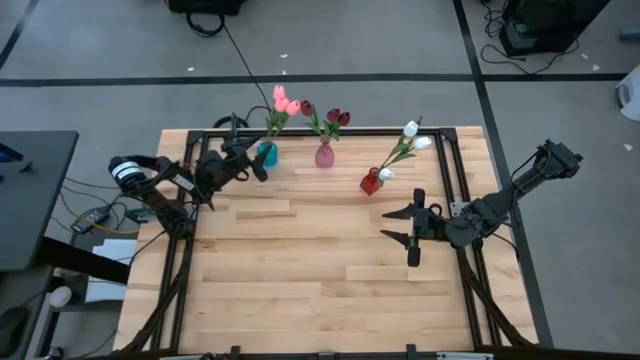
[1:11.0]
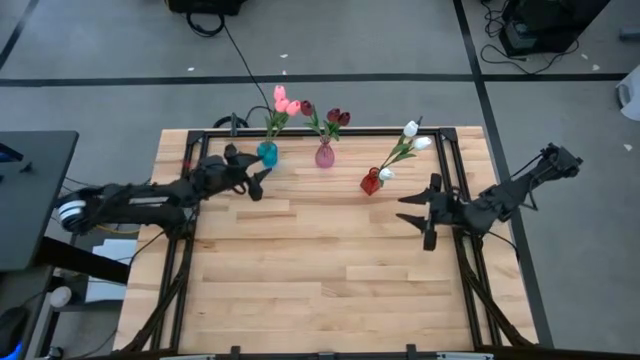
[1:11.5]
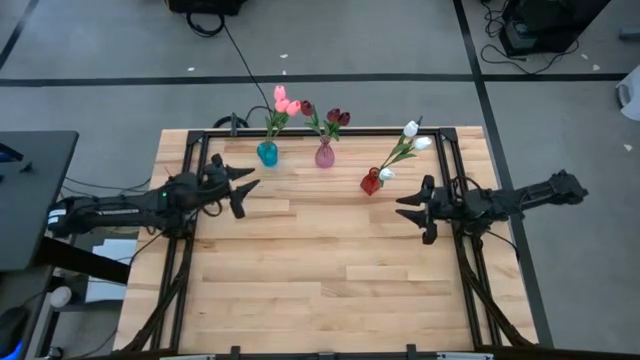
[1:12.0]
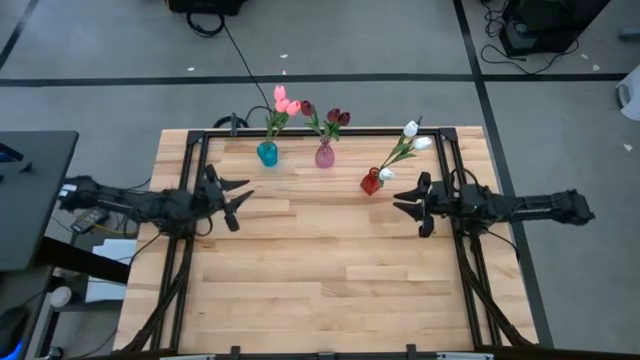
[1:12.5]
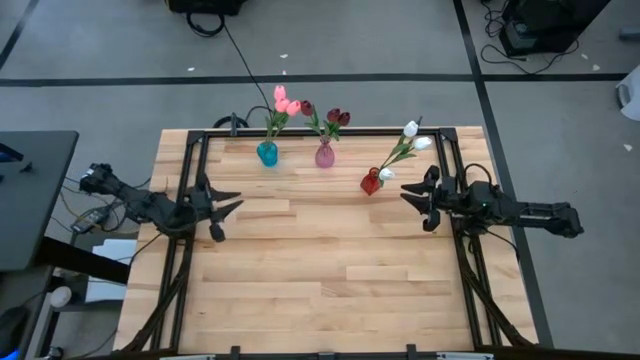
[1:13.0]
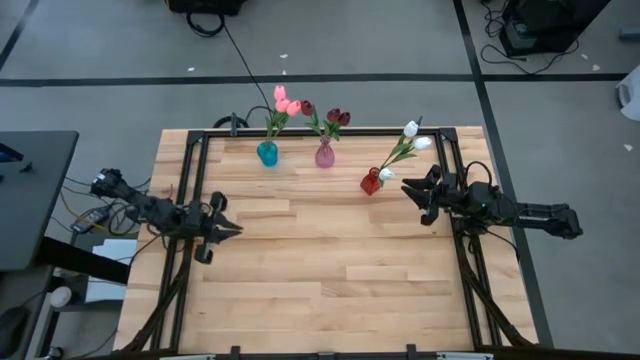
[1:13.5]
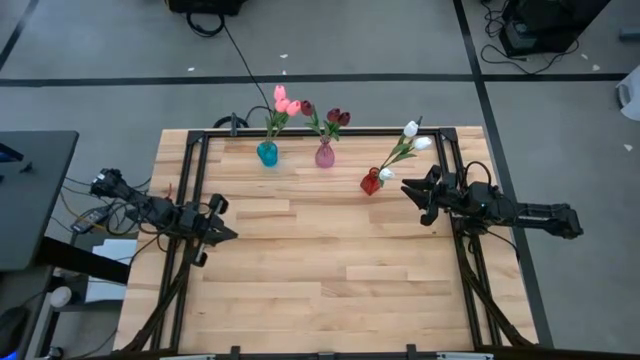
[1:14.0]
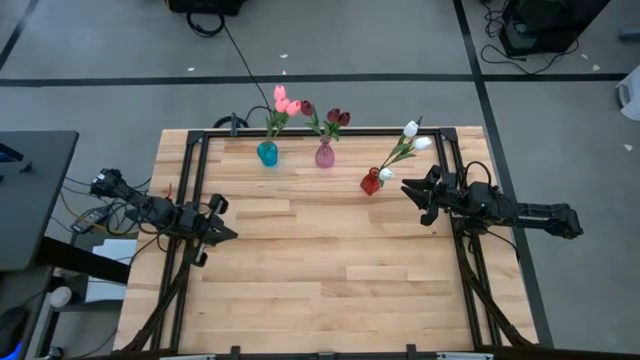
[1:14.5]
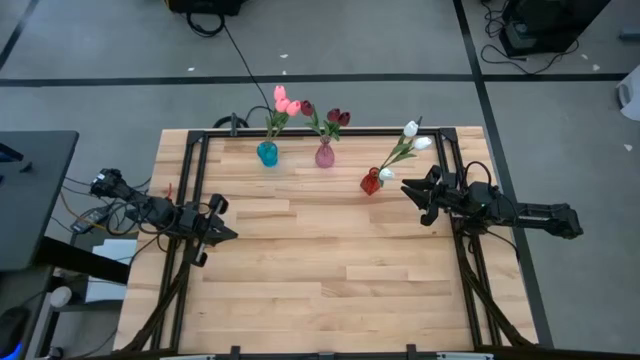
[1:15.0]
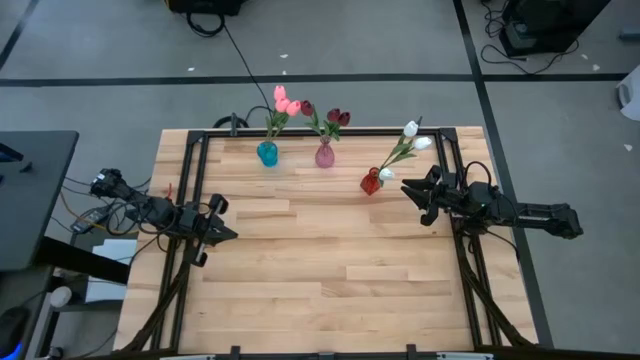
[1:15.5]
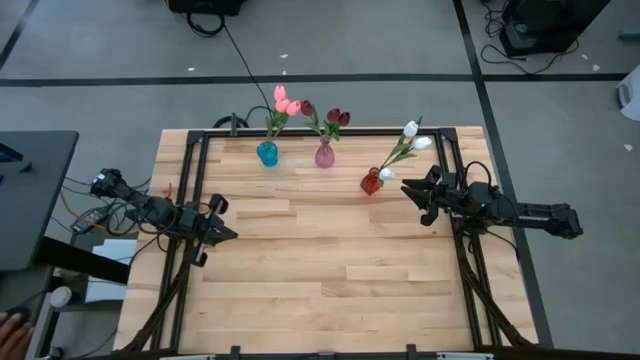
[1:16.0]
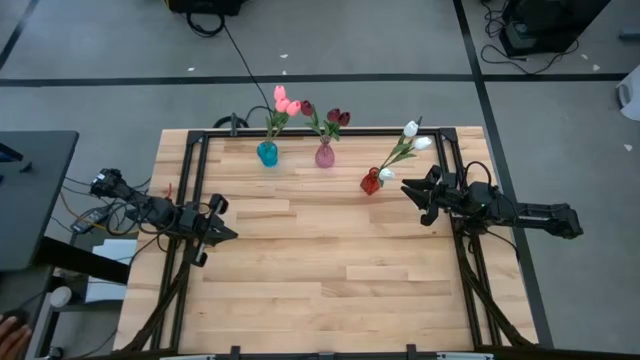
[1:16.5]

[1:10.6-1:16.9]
Task: Sort flowers into vase by color
Return to Home Position

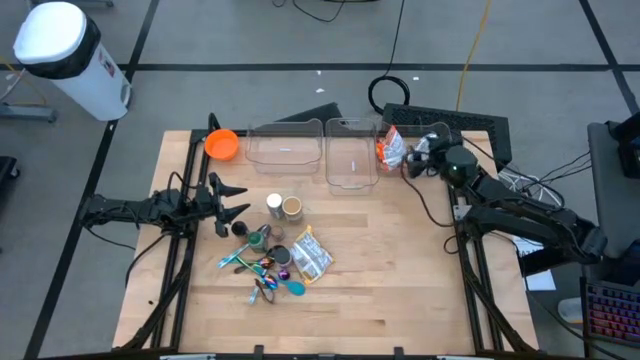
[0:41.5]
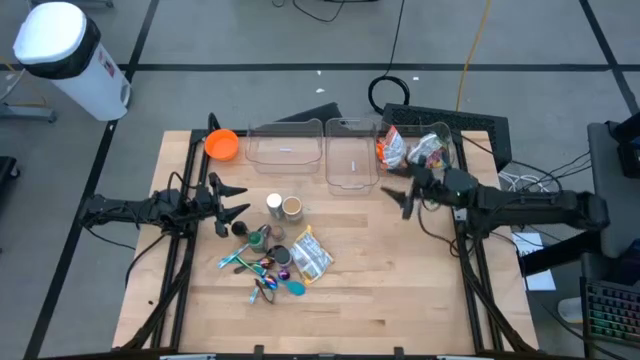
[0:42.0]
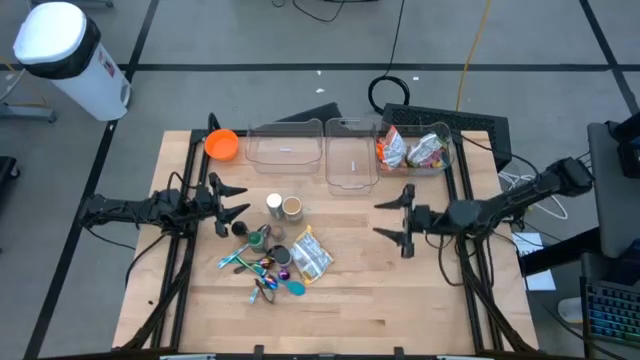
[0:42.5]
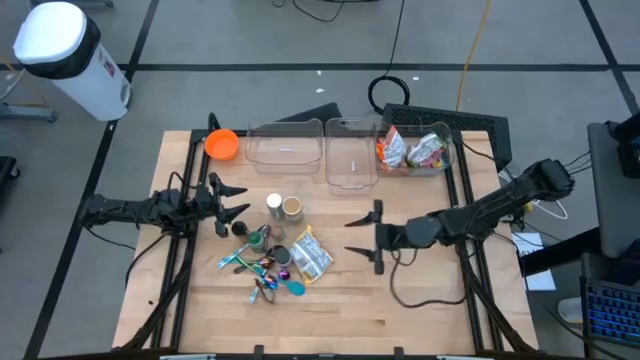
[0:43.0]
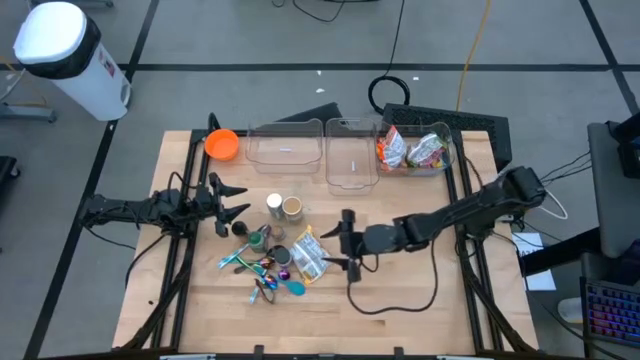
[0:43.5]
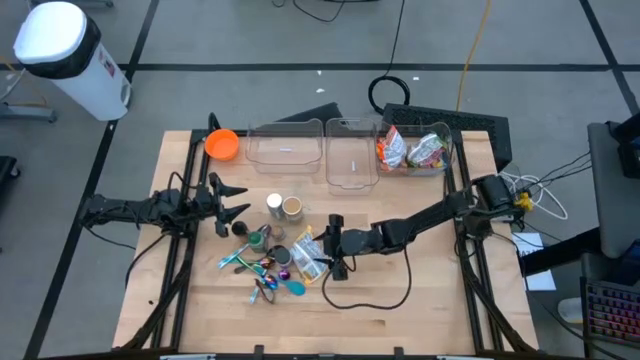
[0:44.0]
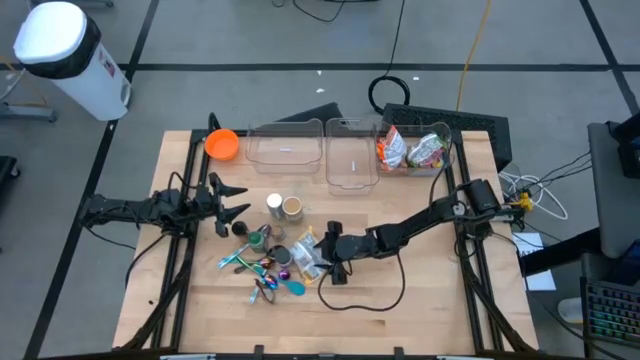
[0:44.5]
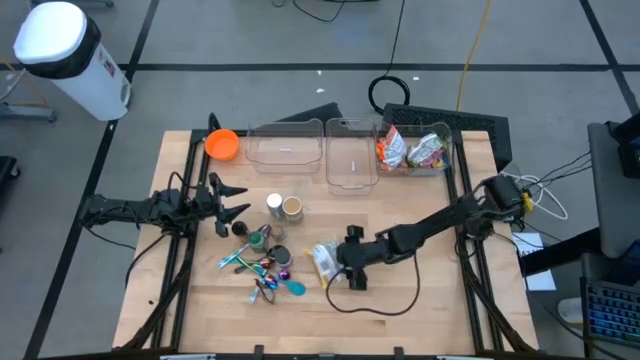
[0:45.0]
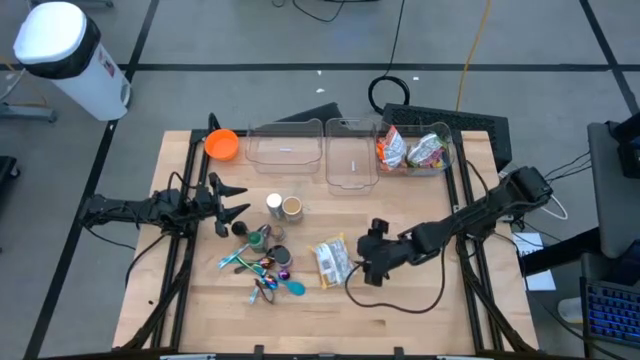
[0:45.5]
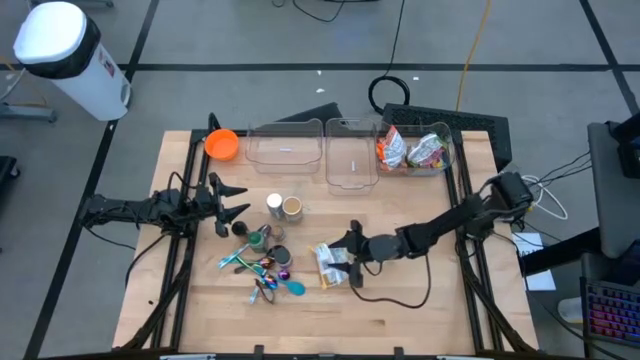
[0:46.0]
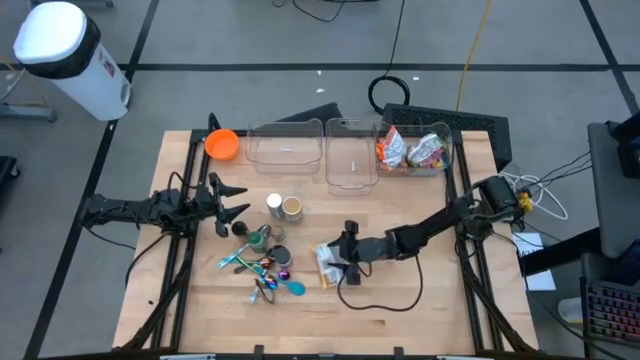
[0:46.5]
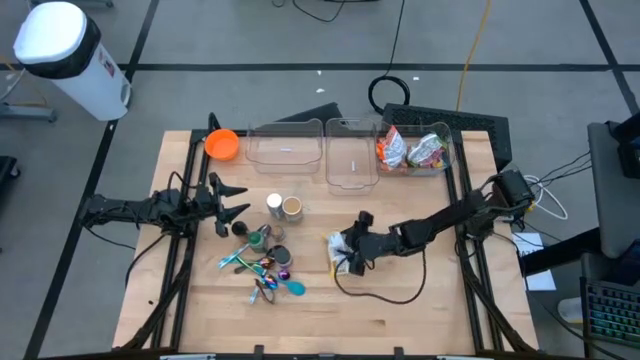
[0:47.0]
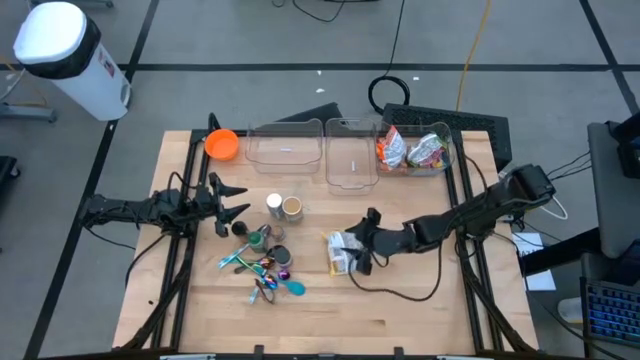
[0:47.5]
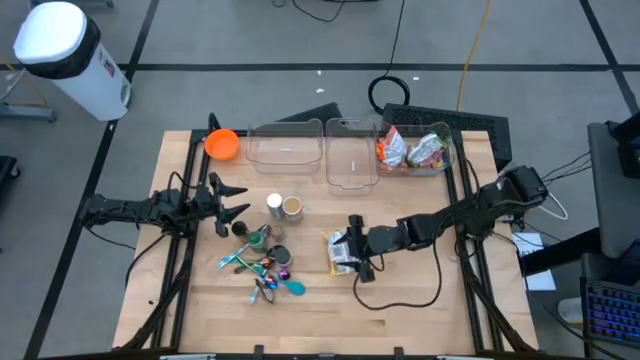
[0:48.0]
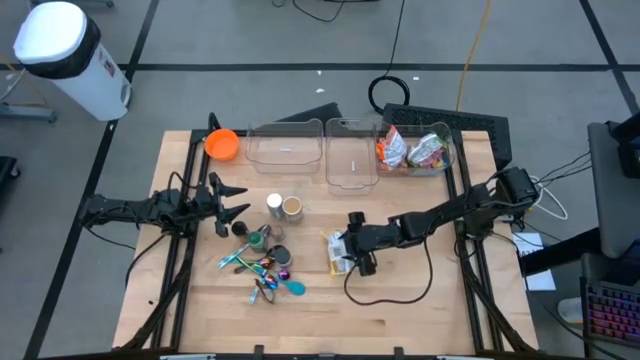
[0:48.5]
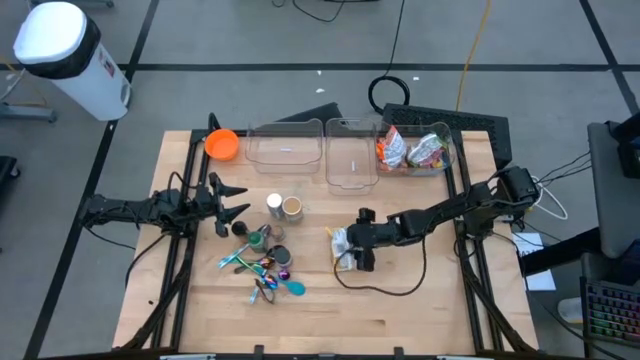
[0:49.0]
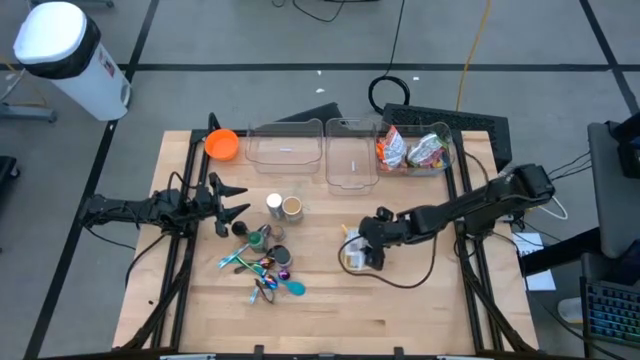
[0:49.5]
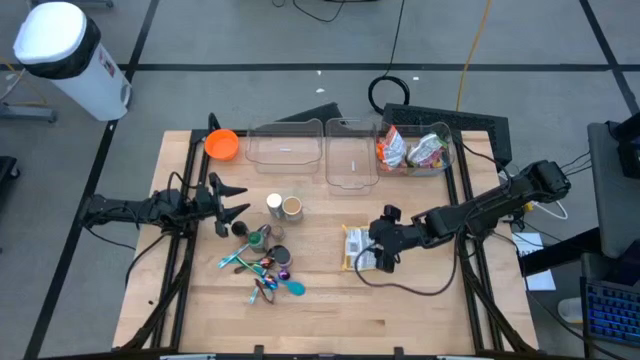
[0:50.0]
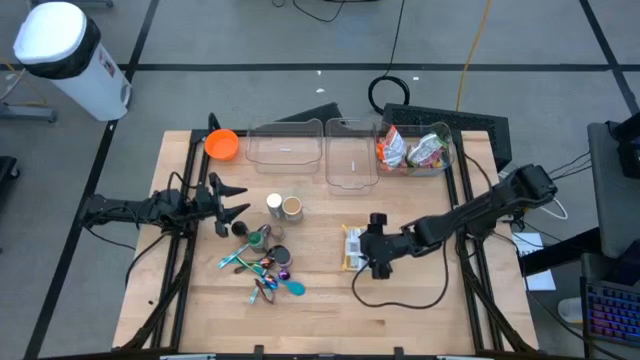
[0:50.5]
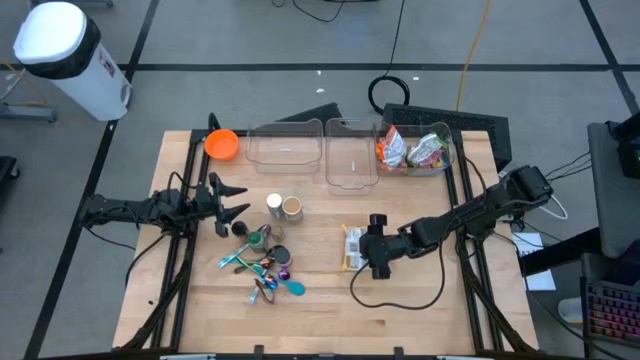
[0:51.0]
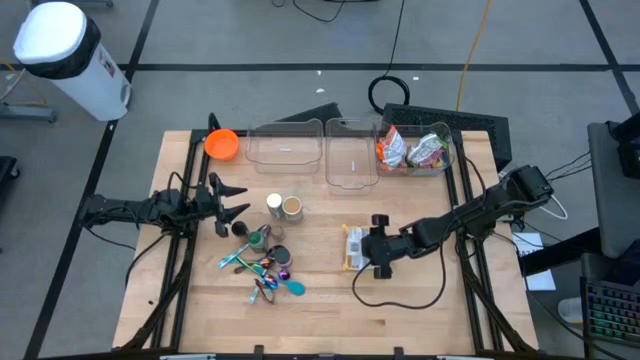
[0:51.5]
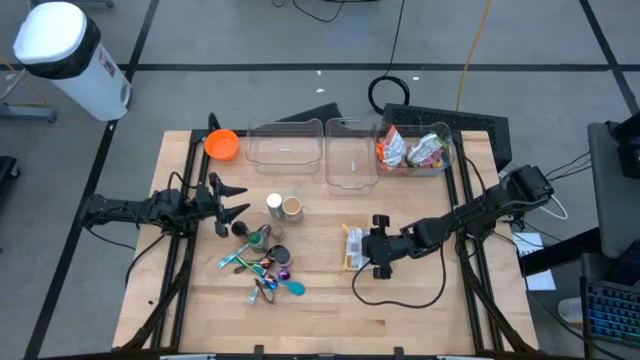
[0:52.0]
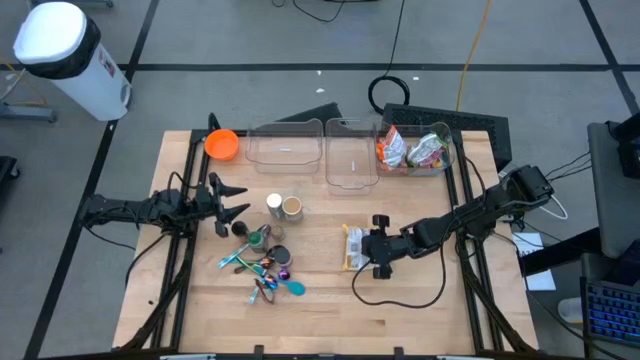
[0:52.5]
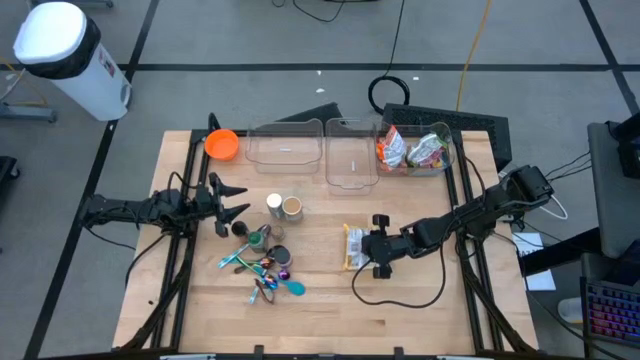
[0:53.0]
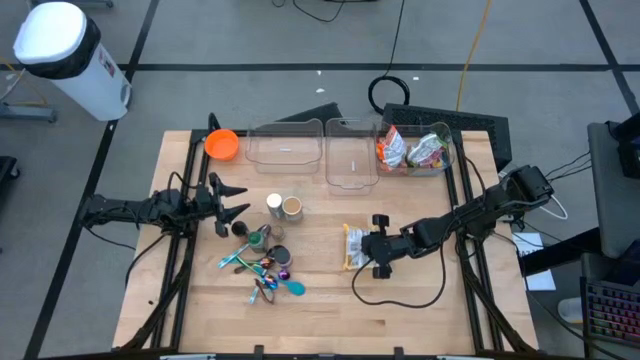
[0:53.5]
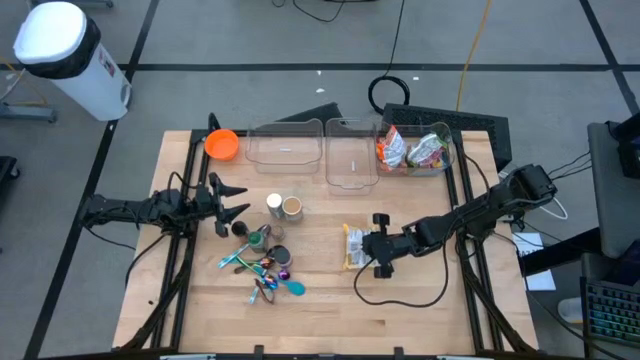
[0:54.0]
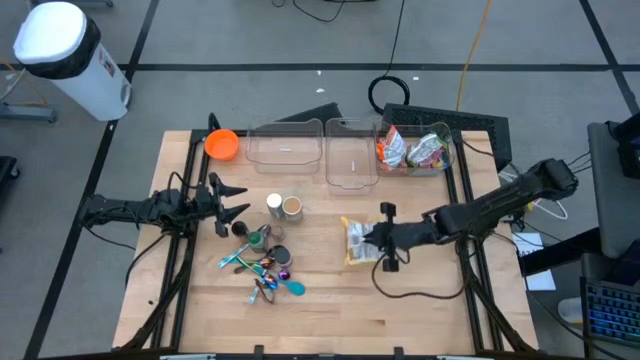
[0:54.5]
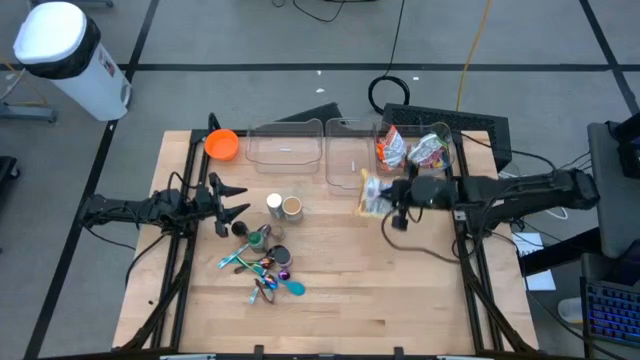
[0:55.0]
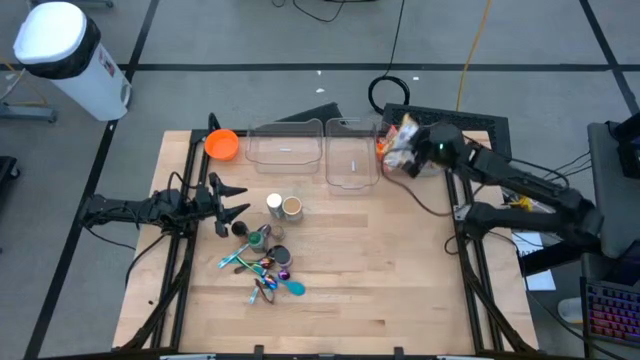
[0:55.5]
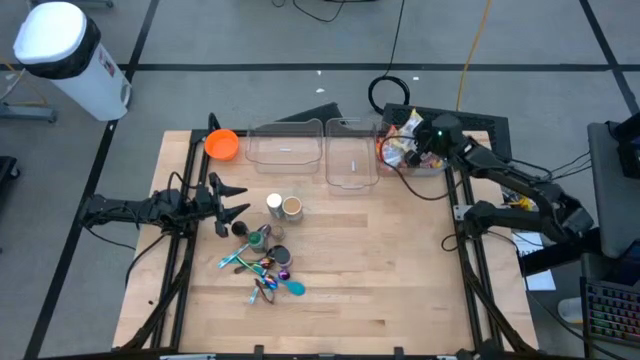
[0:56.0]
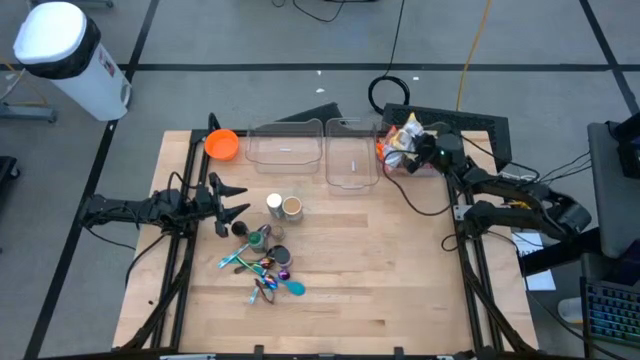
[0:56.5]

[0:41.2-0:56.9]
Task: Pick & Place Food Item
Put the yellow noodle pack into the right transparent bin
